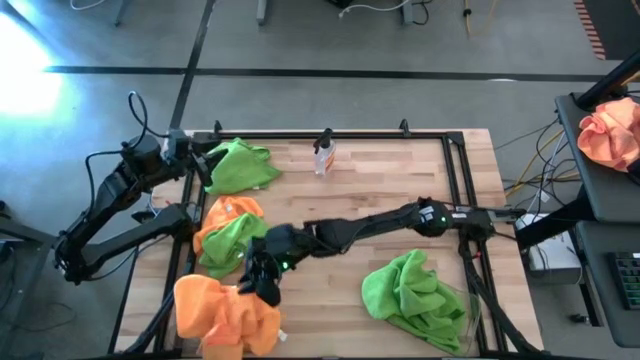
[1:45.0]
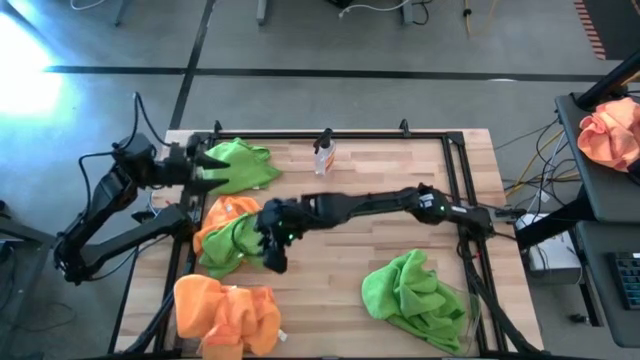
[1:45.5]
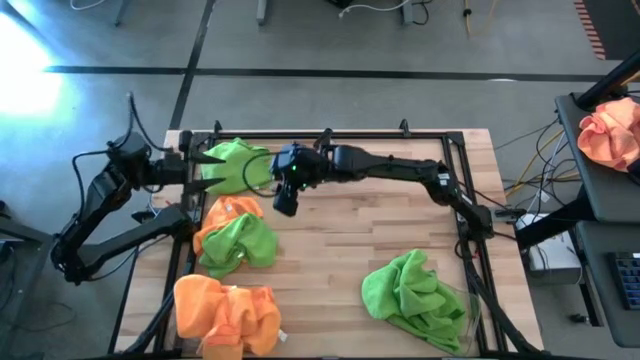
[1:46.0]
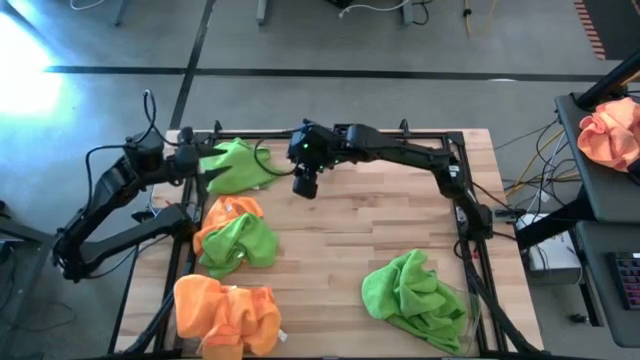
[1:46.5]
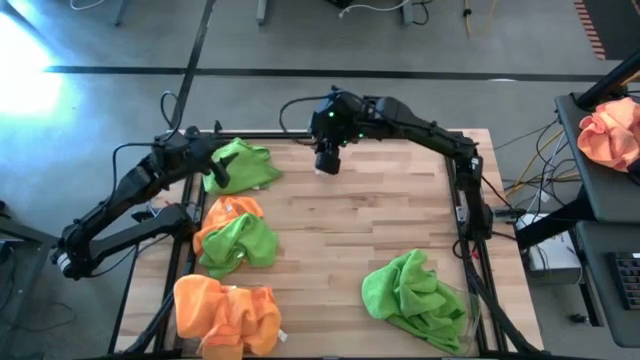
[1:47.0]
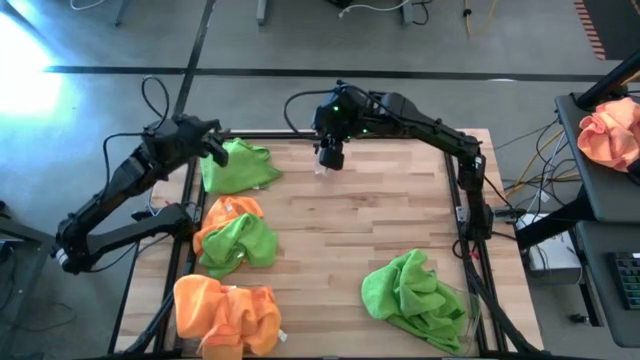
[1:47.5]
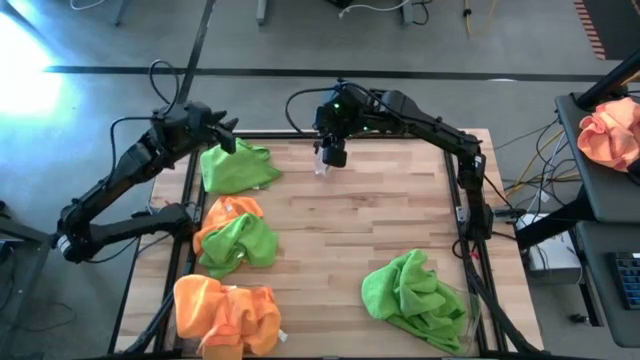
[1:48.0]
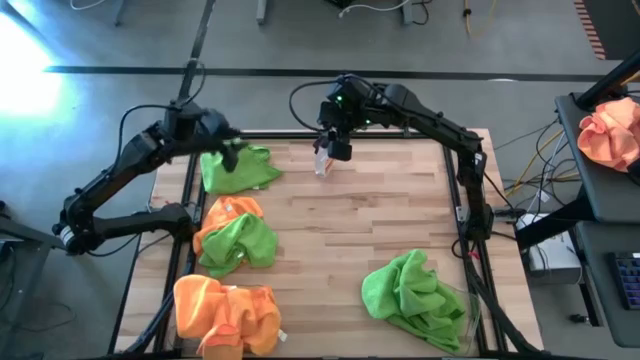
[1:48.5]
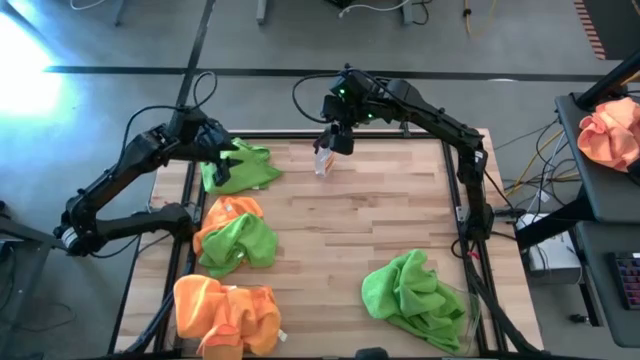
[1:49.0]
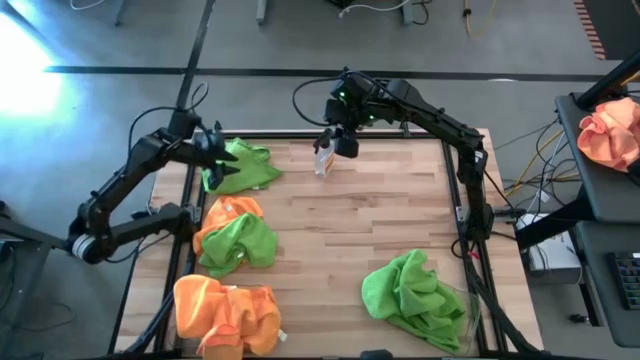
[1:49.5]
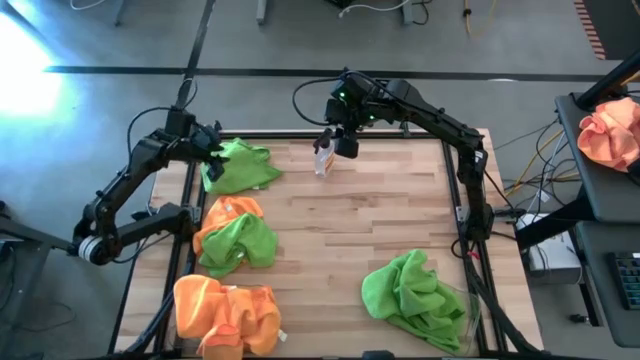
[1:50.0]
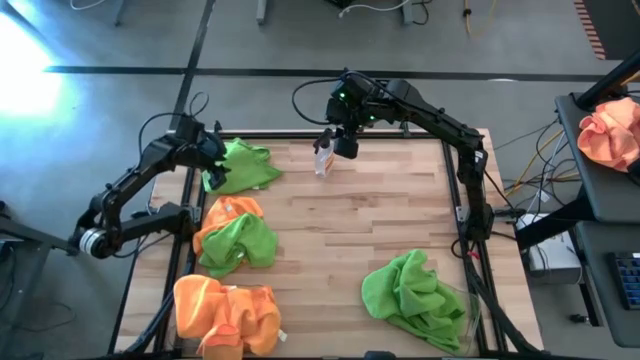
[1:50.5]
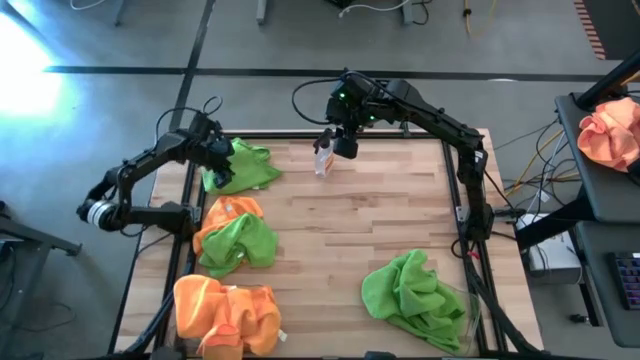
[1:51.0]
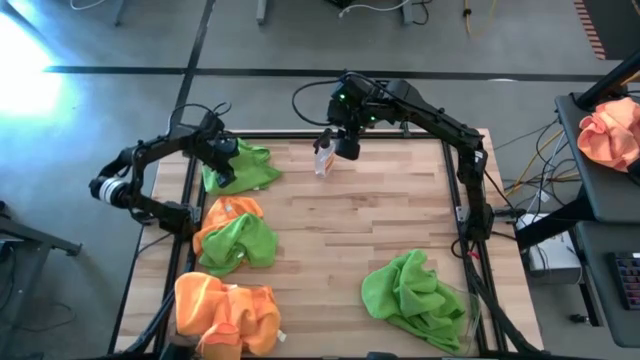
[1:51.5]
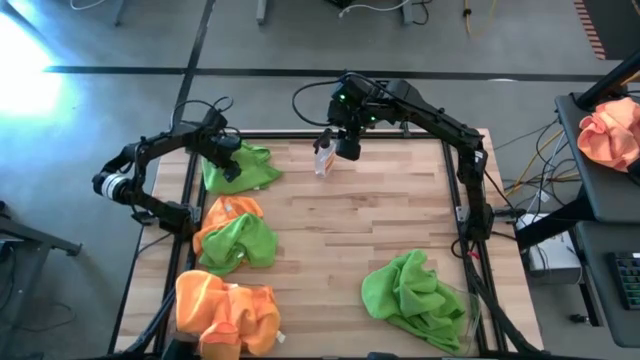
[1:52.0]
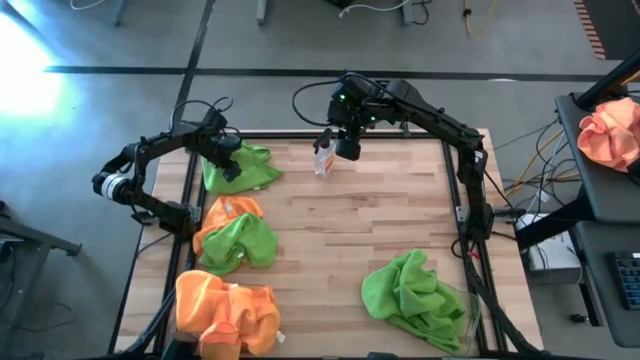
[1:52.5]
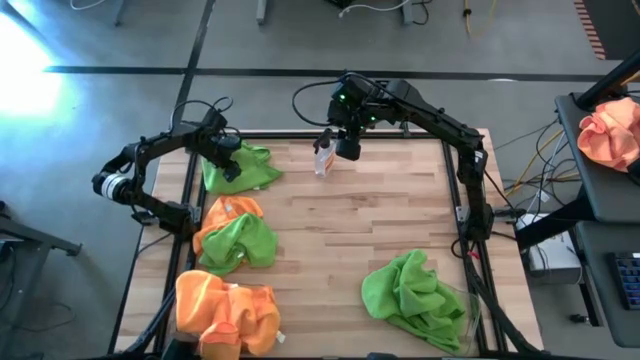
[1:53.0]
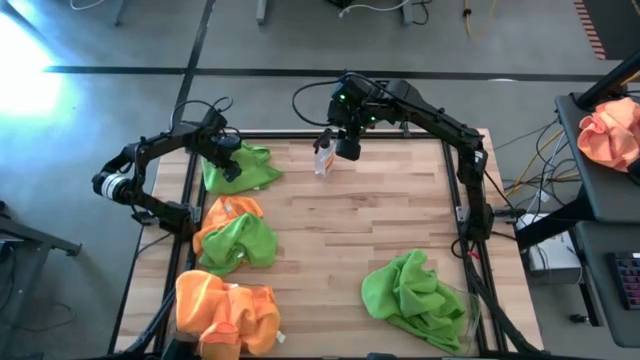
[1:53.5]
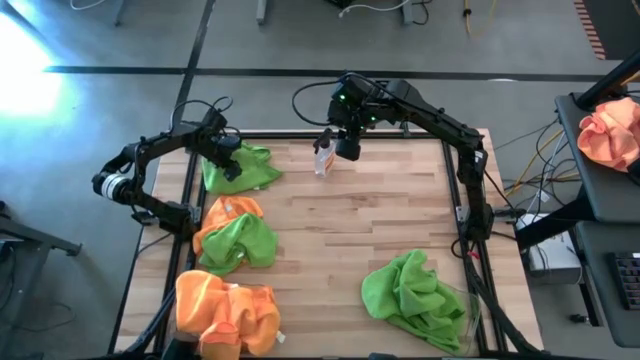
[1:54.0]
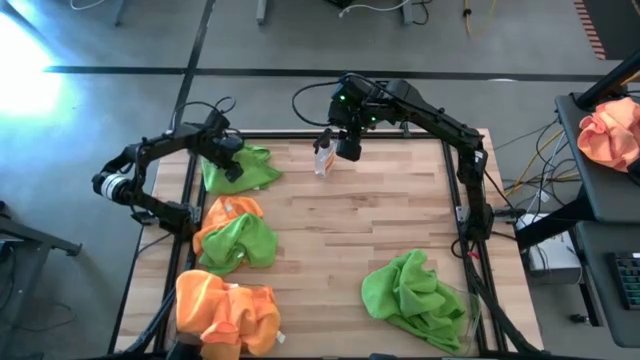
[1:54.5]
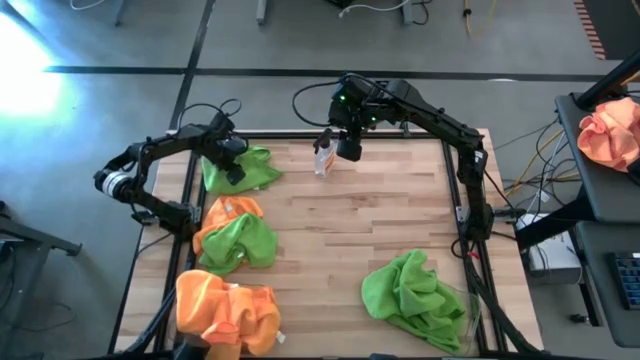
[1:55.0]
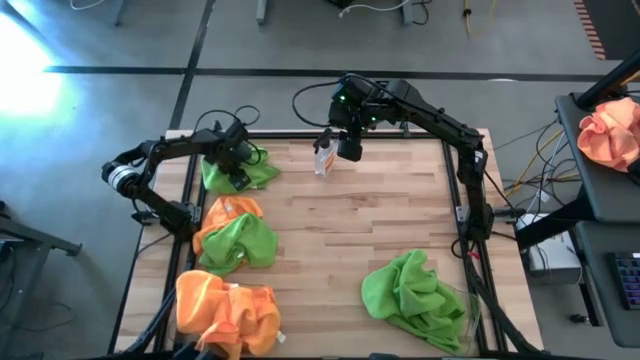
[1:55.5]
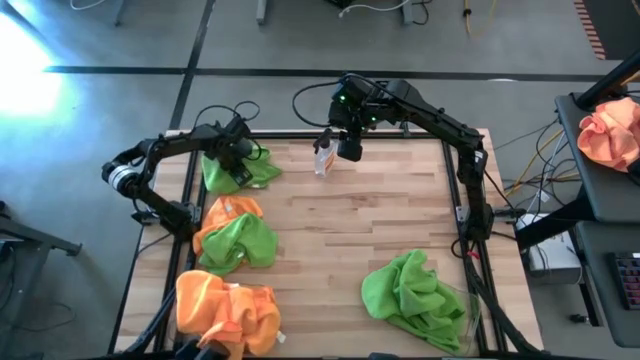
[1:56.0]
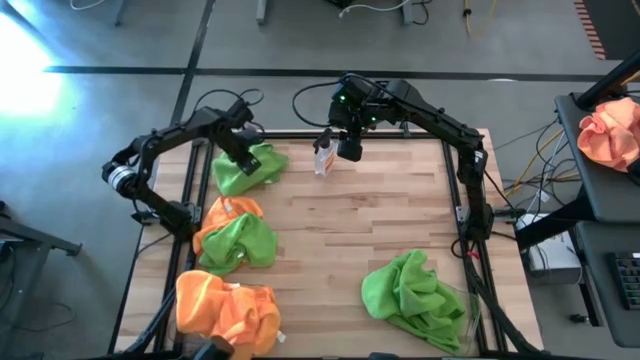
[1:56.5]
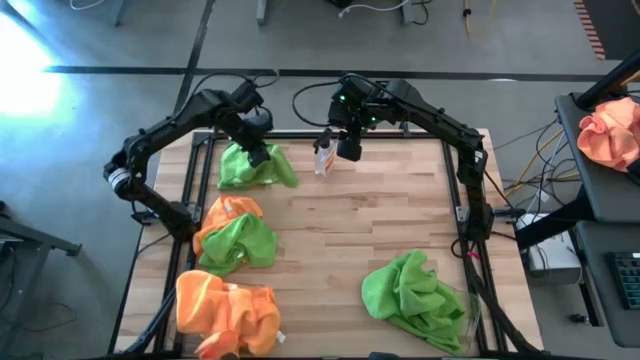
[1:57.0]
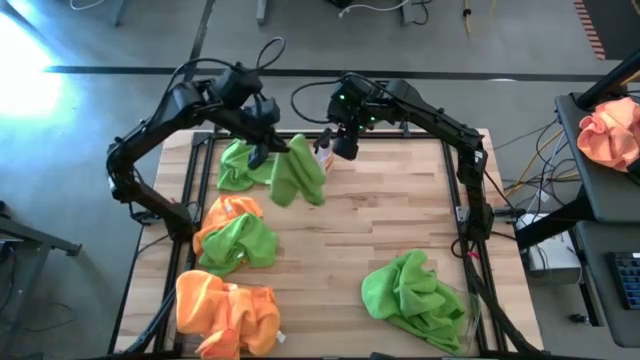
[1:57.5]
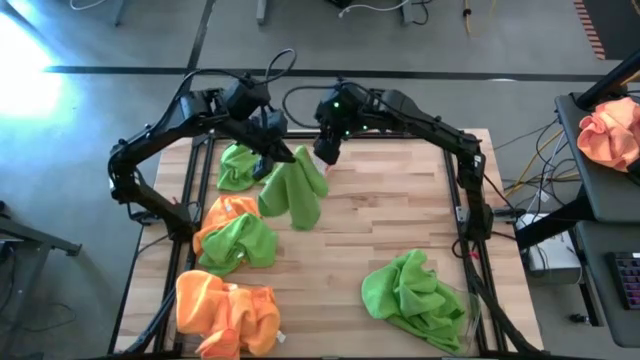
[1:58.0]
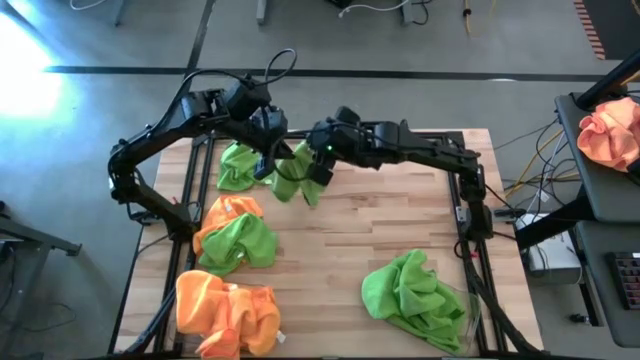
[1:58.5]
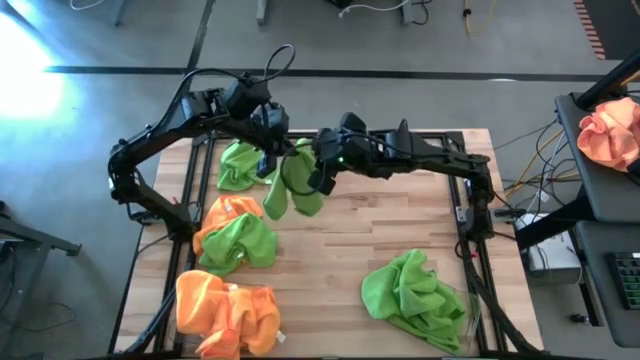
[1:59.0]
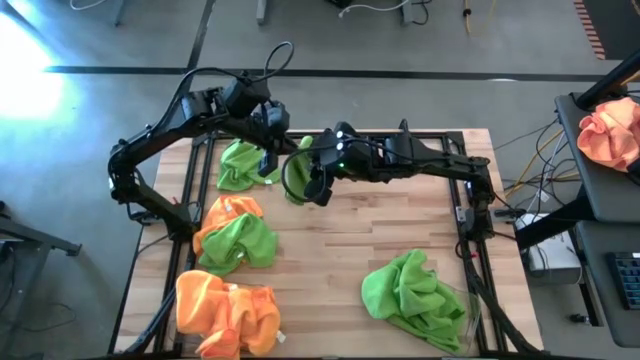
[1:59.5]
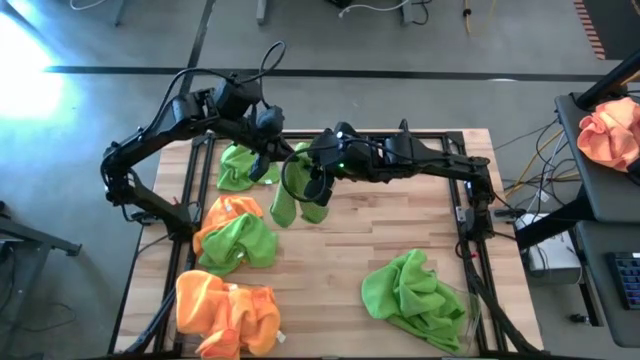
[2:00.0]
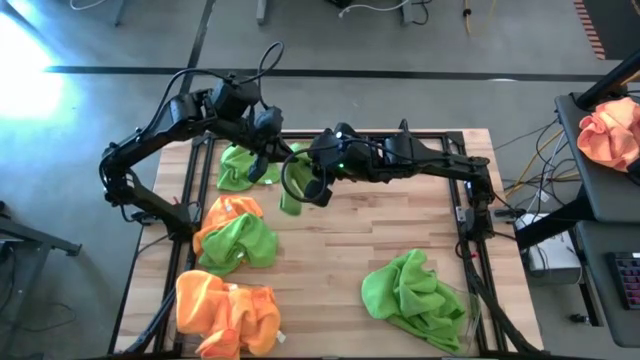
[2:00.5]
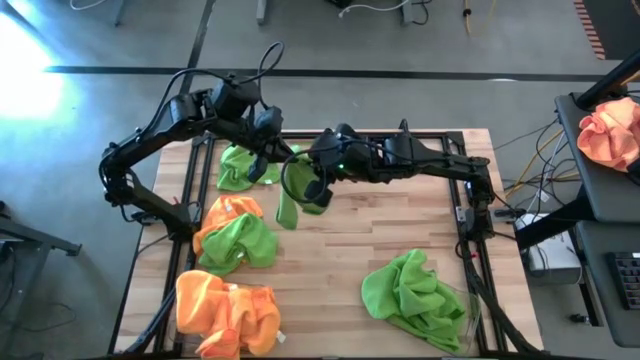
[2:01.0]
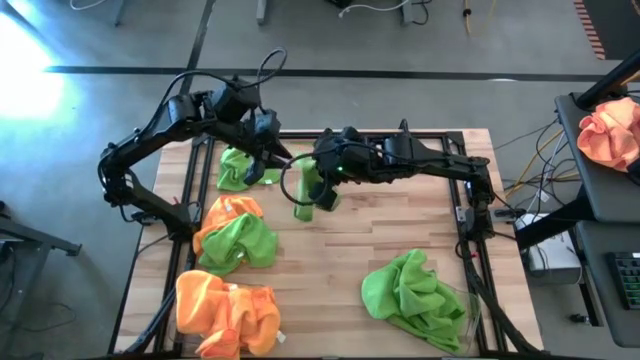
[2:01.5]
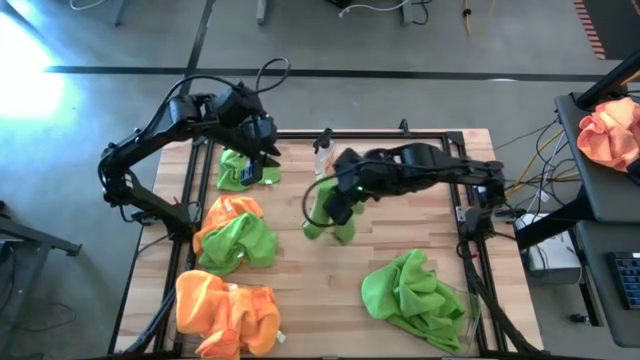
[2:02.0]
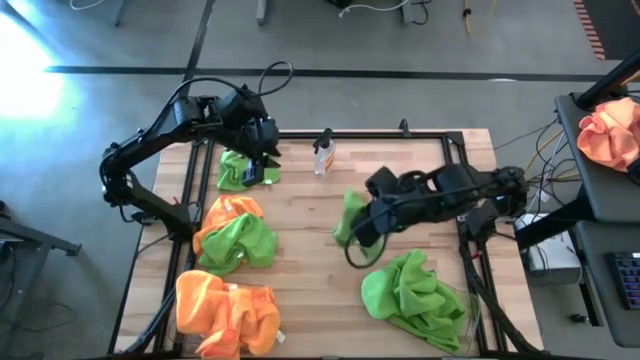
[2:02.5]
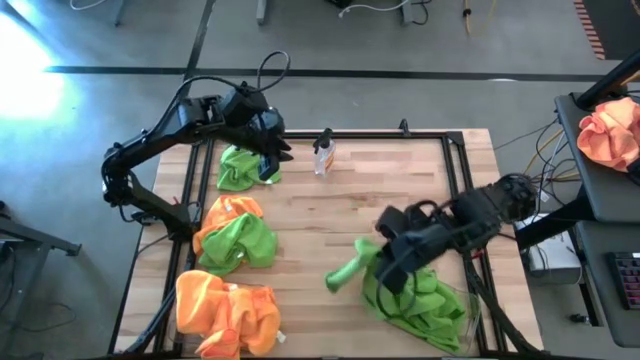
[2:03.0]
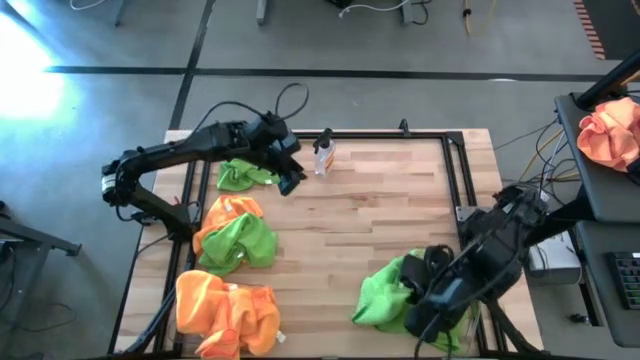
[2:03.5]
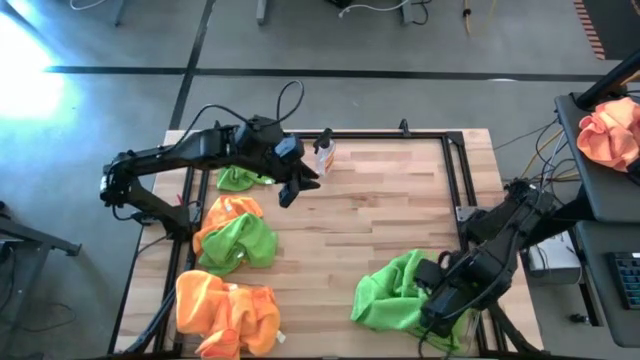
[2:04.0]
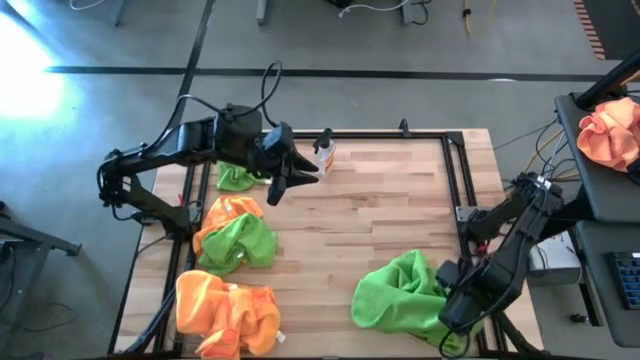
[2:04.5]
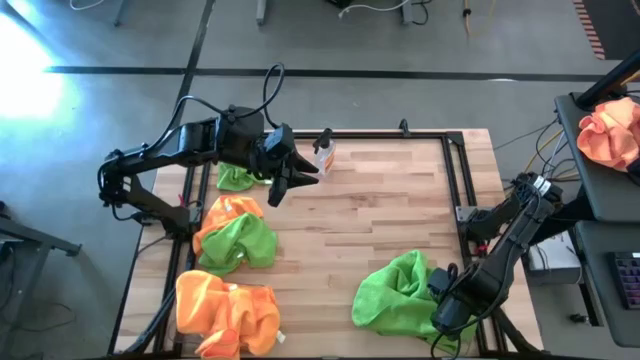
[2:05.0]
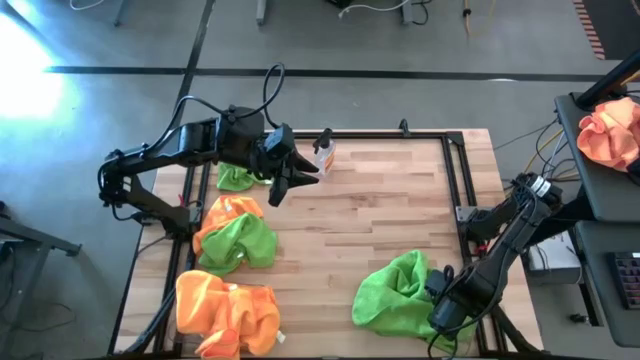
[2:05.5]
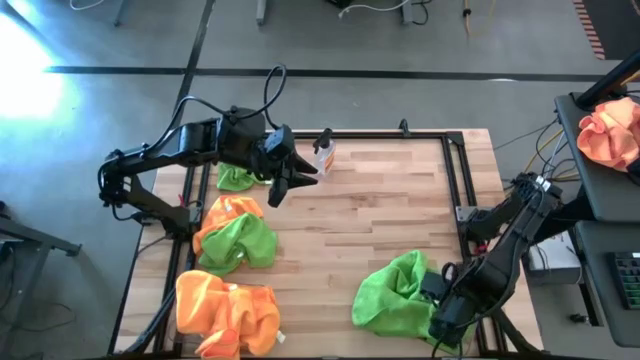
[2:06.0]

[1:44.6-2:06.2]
Task: Sort microfiber towel by color & place in baskets
Put the green microfiber cloth into the right transparent bin
